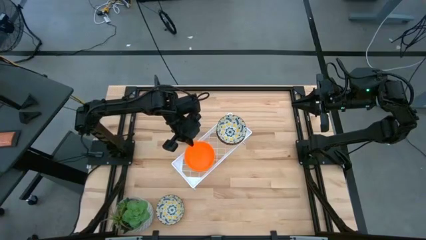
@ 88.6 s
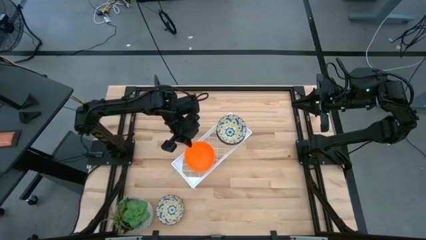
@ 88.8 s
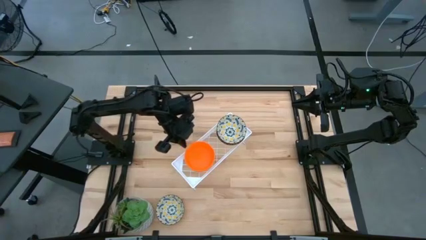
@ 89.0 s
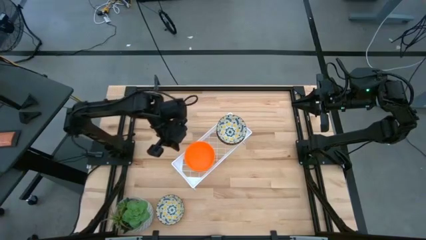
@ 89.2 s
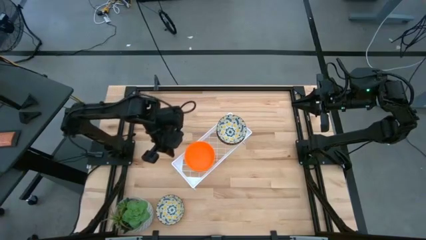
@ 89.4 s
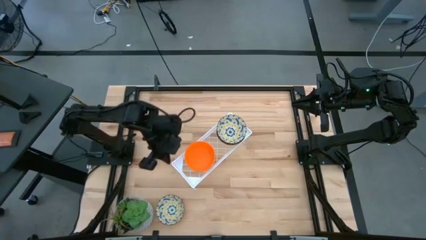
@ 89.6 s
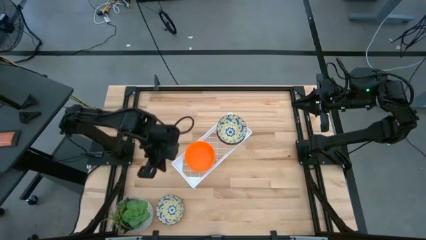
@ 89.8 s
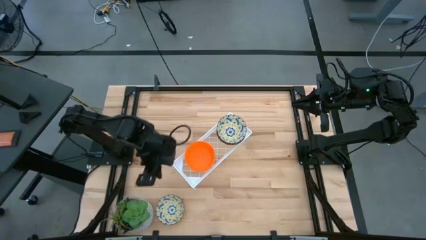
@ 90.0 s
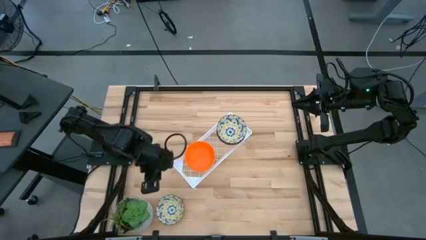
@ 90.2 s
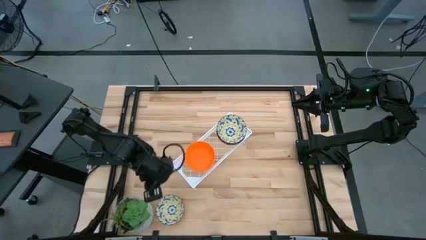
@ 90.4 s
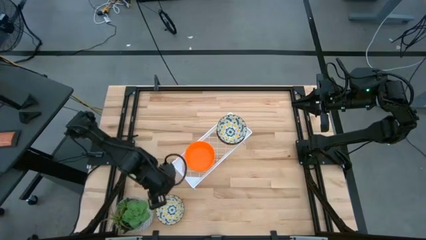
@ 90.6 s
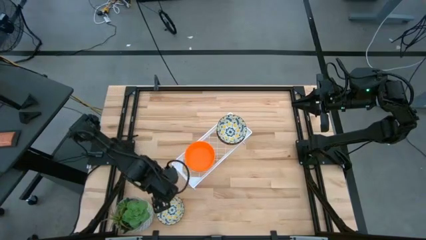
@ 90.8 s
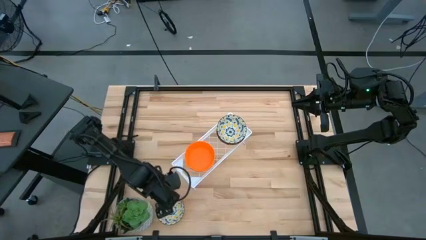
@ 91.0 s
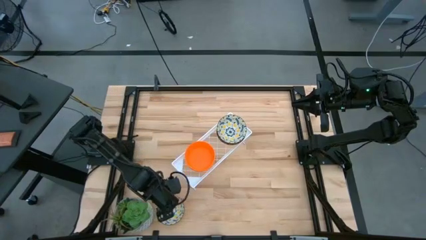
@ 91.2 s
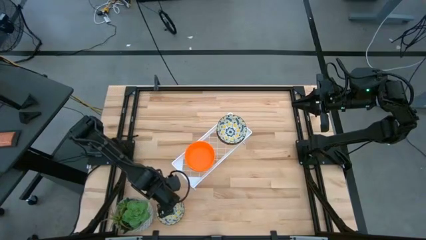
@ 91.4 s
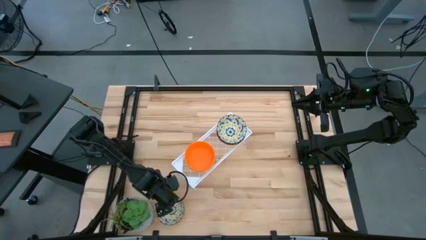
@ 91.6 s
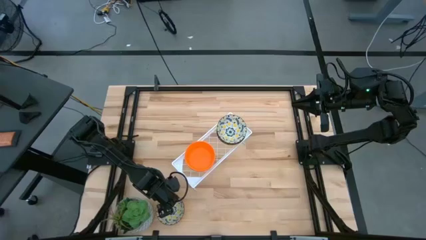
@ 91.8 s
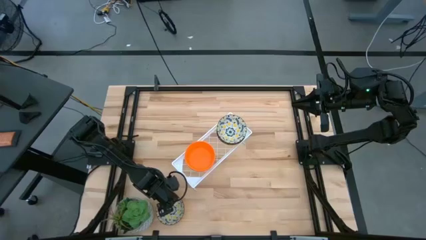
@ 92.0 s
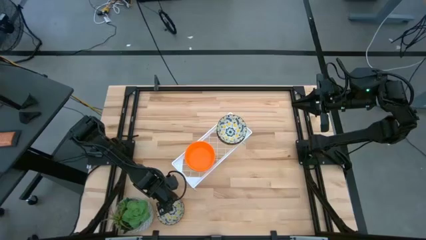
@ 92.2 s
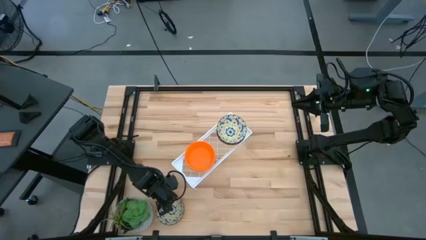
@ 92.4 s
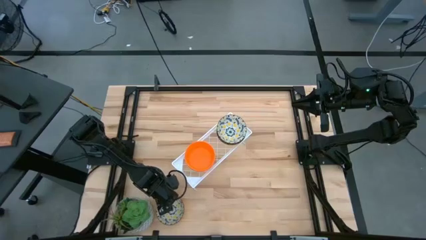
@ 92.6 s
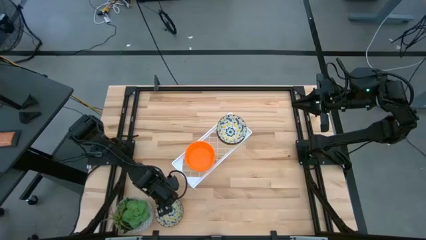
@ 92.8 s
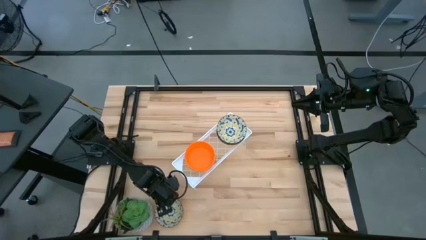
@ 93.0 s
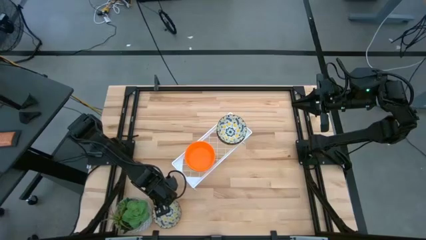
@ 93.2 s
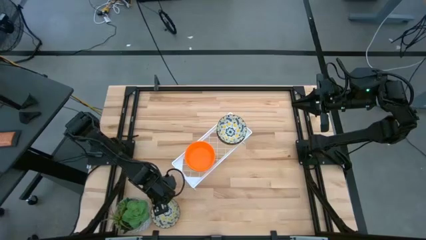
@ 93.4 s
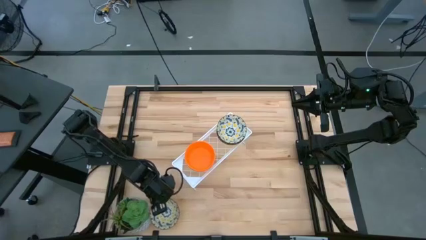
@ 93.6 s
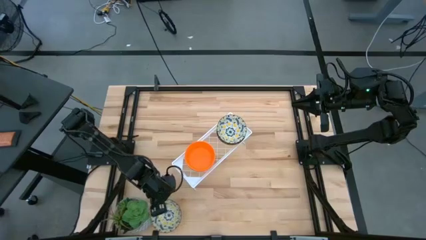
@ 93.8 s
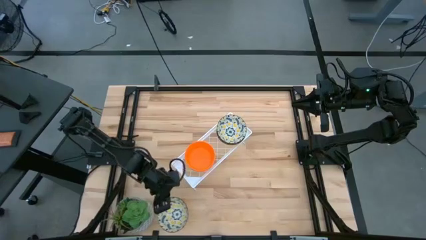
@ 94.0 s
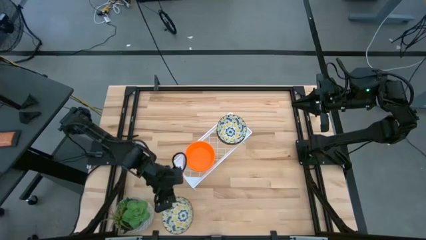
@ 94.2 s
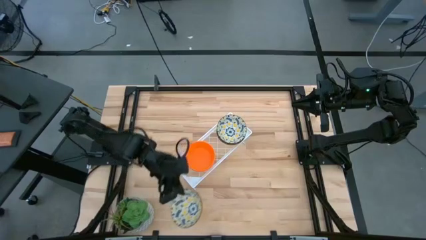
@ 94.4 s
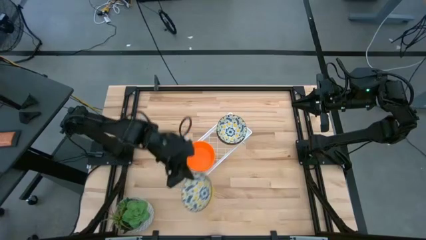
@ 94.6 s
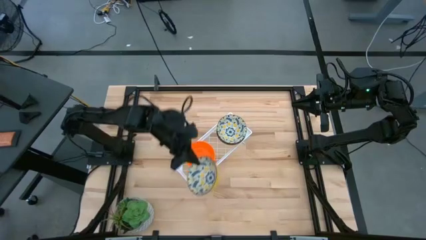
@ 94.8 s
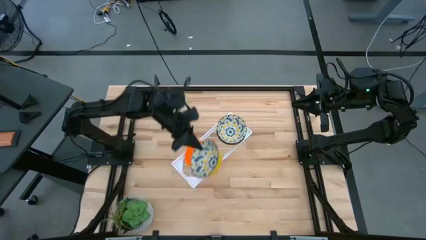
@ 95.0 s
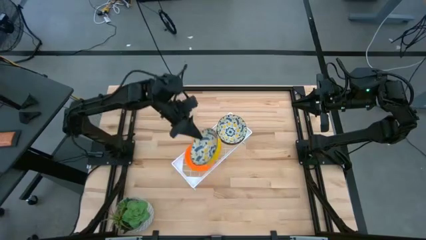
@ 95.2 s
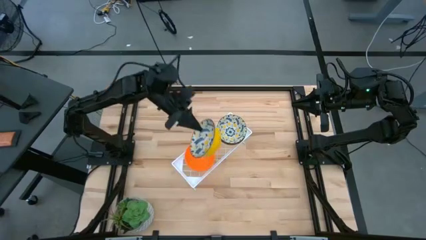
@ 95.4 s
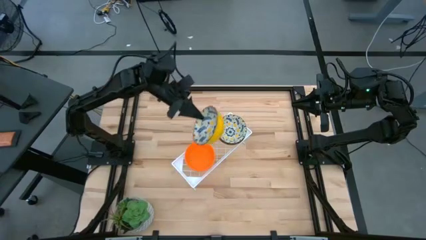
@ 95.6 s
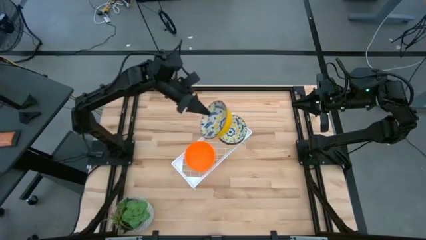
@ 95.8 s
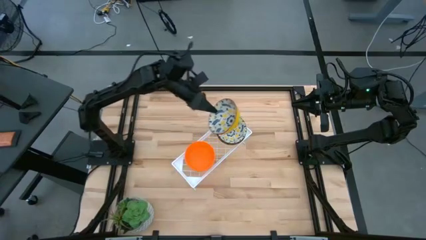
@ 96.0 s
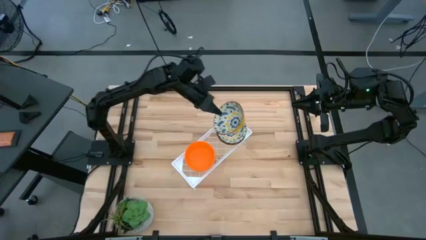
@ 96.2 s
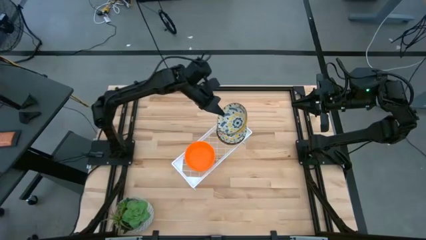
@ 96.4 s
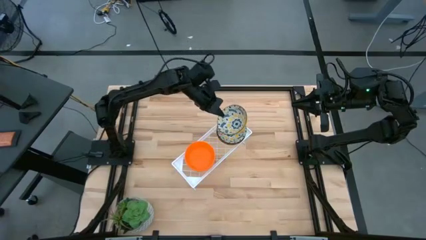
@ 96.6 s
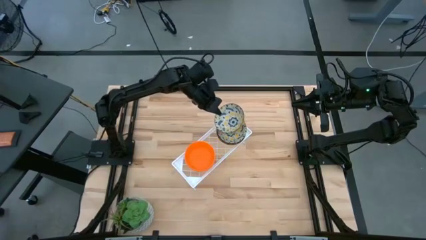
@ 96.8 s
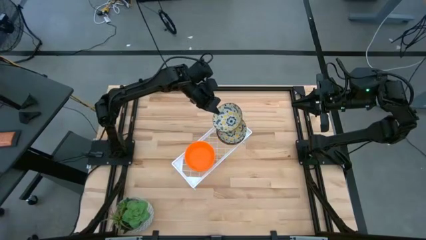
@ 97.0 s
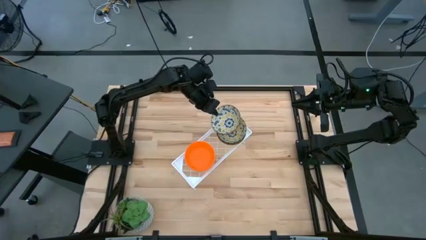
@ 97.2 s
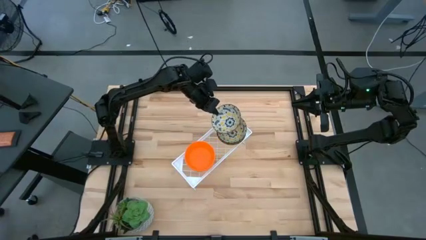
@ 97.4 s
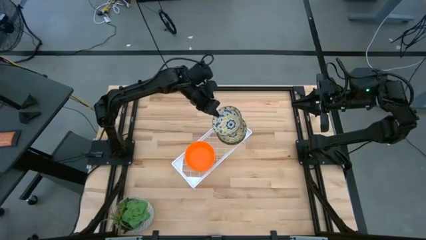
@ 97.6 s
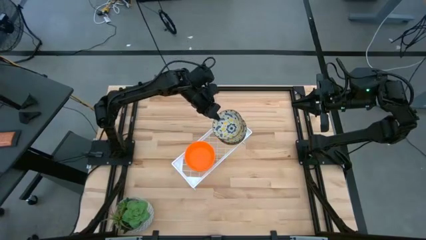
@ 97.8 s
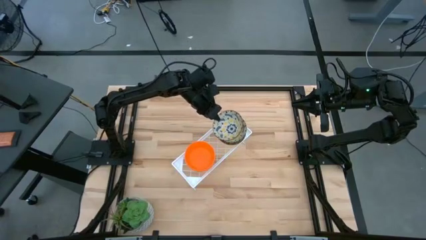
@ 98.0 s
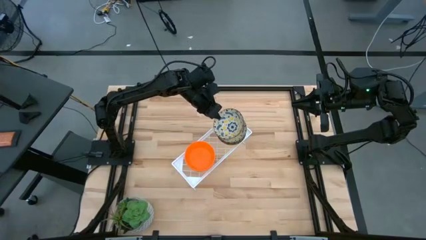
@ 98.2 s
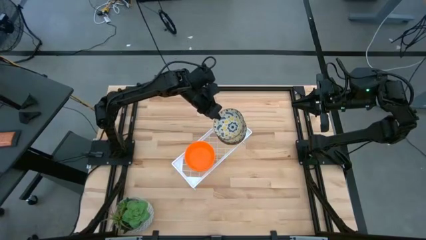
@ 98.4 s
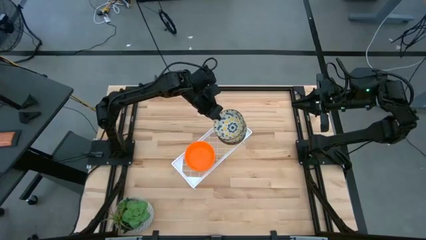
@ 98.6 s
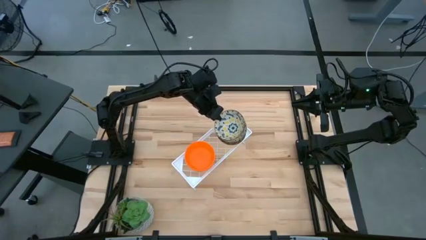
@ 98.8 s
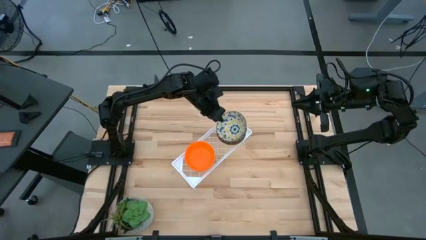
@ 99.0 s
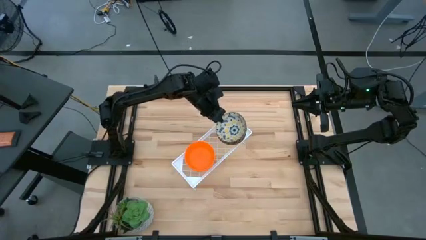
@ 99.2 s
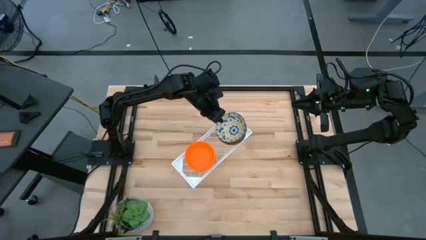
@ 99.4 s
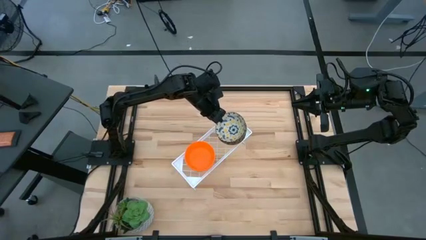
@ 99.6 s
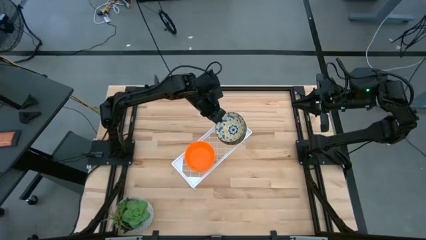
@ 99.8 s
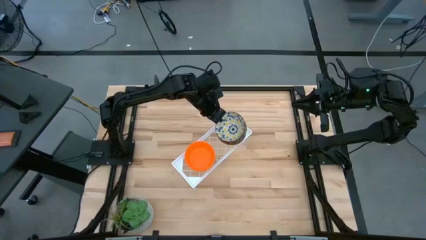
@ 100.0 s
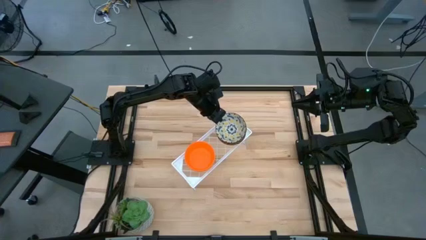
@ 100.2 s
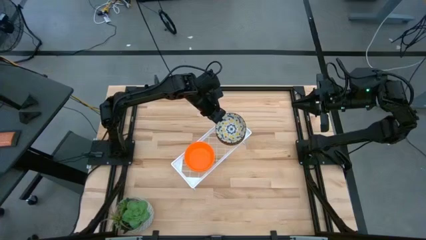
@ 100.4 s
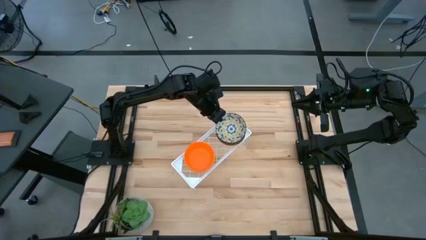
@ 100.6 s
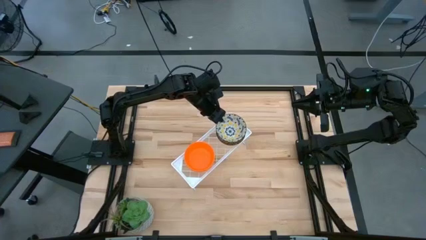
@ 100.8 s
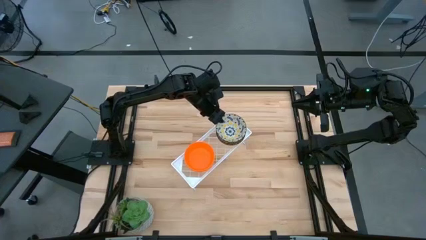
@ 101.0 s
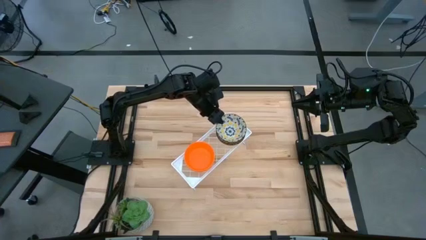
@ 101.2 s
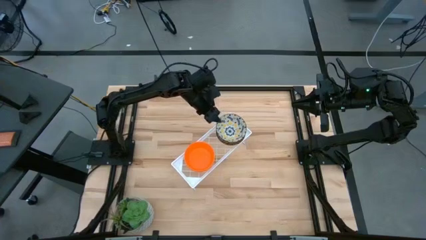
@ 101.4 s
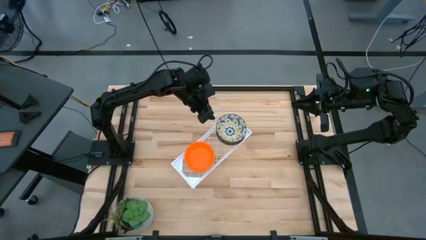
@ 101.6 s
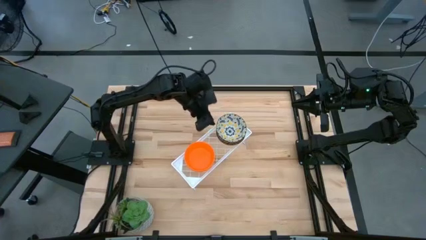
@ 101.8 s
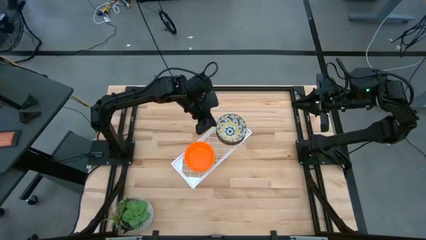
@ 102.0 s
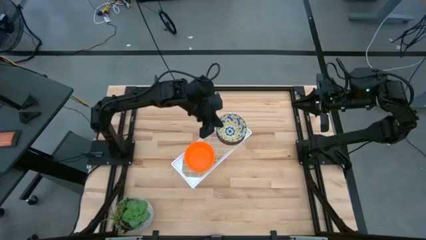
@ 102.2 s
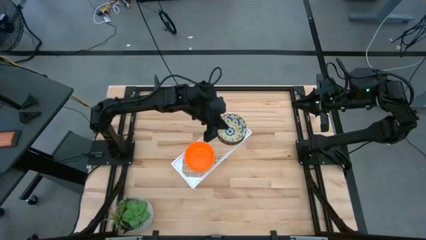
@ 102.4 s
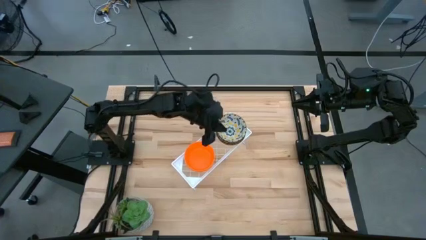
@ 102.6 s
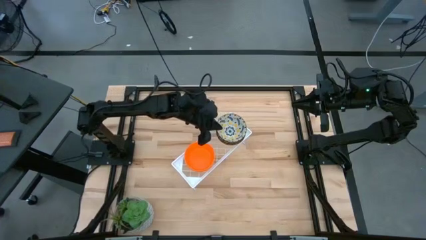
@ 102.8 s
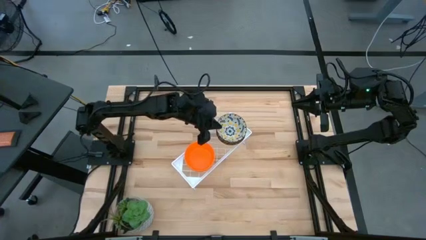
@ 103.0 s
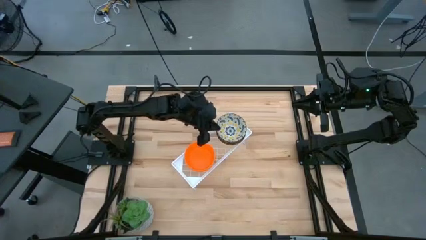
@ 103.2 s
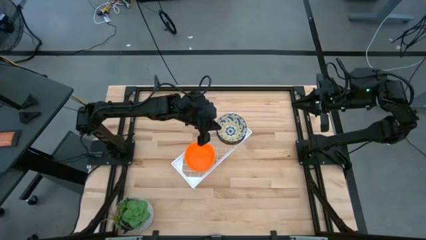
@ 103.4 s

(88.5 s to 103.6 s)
Task: Pick & Place Mini bowls
Stack the yellow patterned bowl on top of the yellow patterned bowl on the shelf

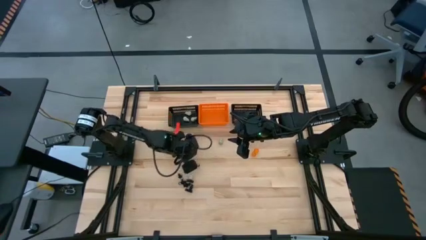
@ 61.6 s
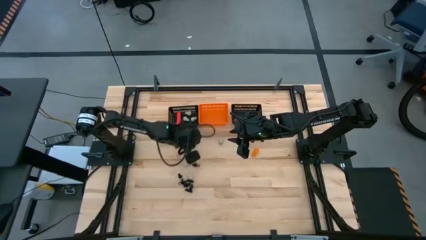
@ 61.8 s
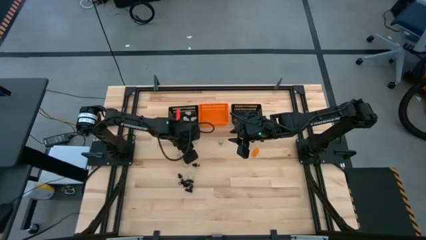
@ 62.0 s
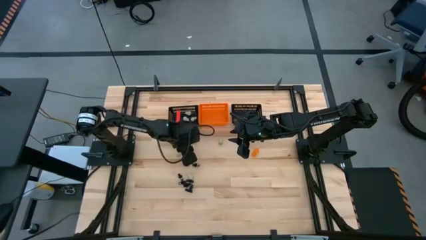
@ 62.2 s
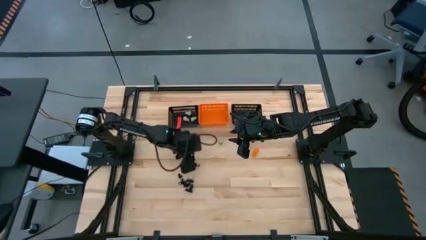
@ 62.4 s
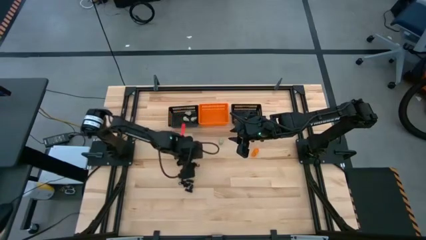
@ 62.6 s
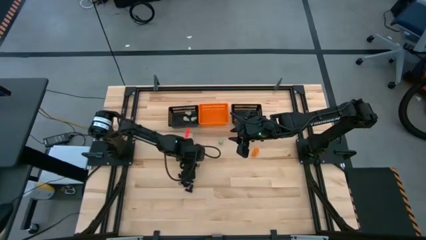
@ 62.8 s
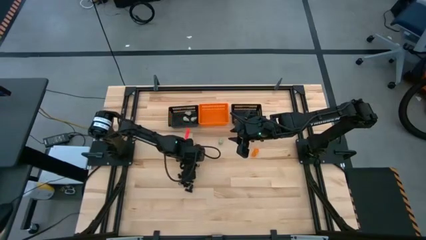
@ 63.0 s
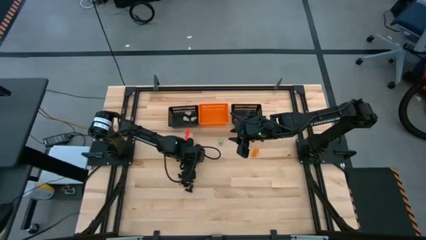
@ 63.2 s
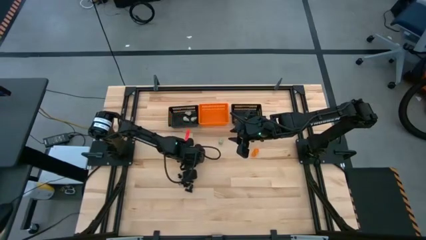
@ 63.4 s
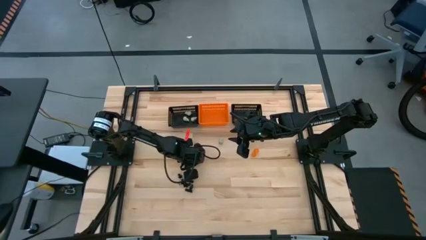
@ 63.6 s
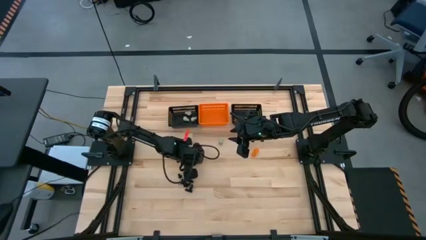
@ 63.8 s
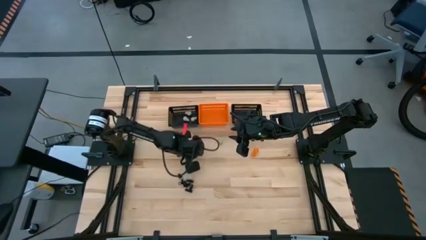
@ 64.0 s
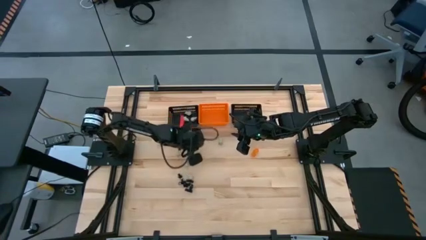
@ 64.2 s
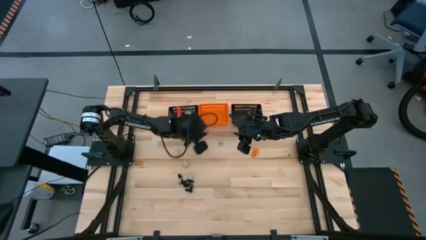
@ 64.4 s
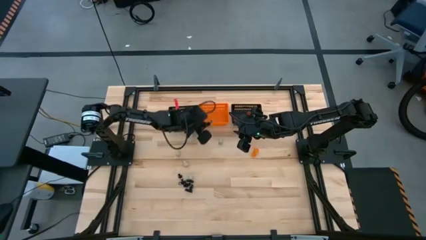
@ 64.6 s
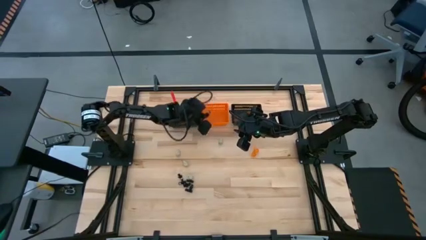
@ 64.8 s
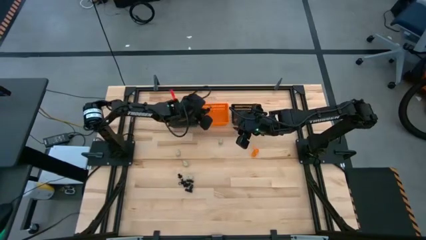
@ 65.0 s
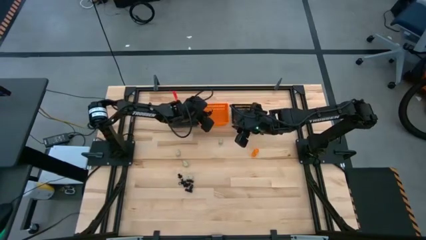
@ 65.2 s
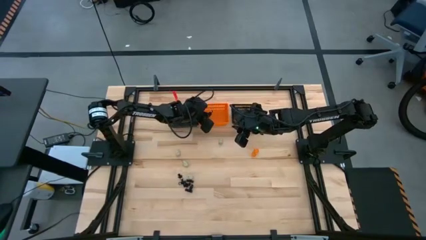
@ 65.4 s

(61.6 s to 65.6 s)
Task: Sort Halloween decoration
Put the black skeleton toy into the orange bin
